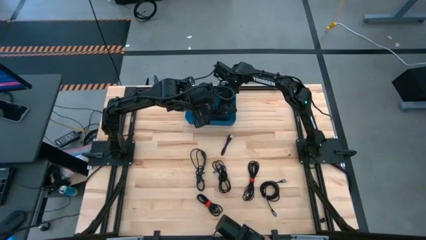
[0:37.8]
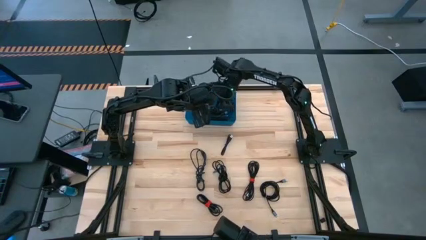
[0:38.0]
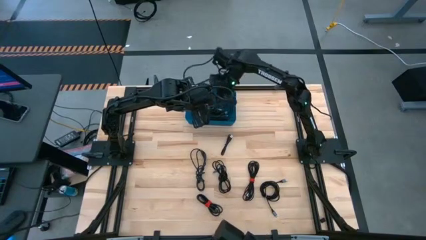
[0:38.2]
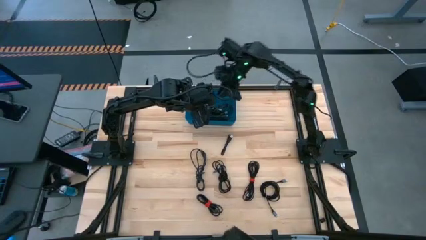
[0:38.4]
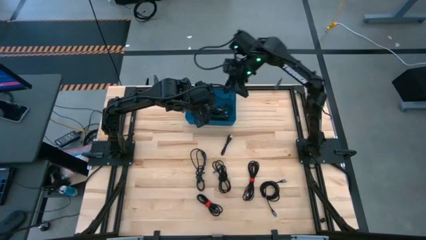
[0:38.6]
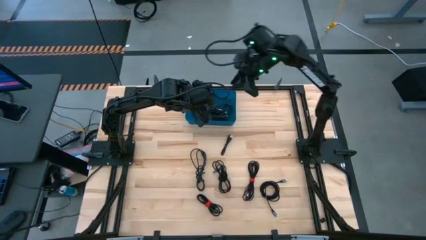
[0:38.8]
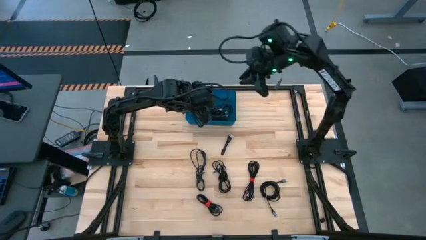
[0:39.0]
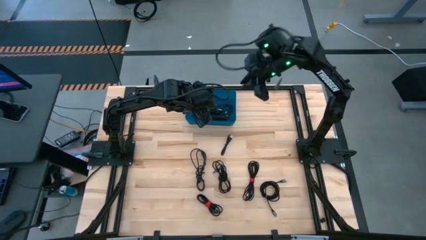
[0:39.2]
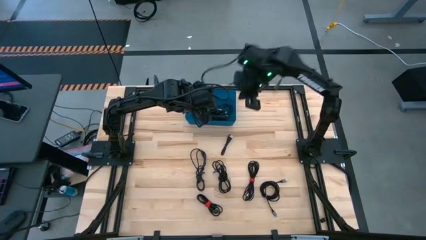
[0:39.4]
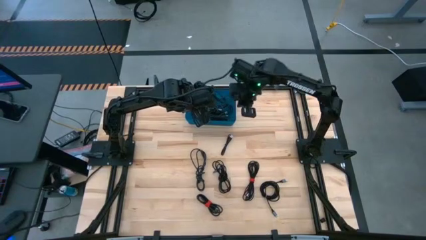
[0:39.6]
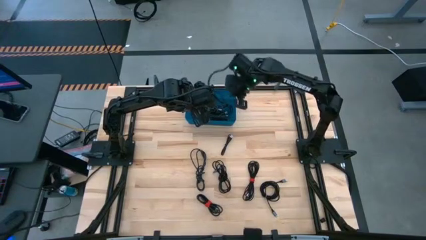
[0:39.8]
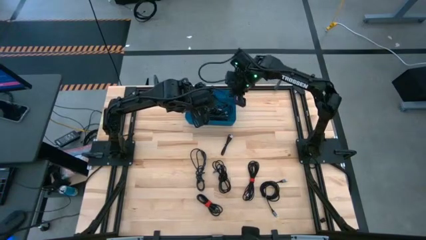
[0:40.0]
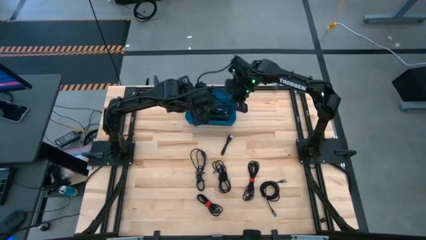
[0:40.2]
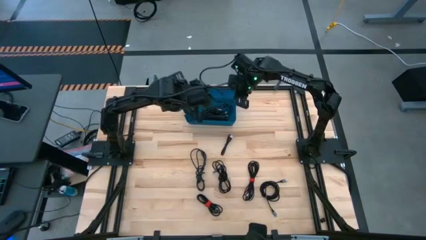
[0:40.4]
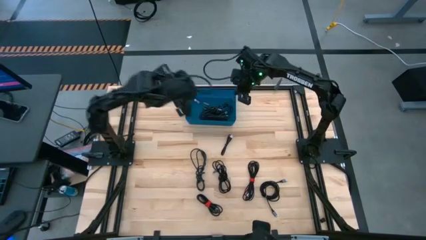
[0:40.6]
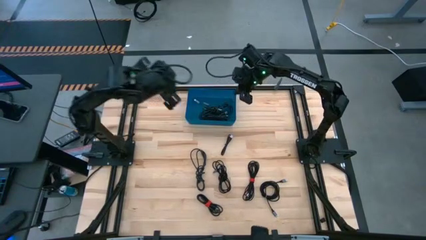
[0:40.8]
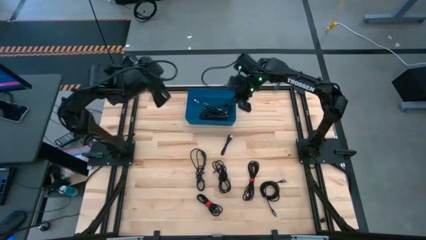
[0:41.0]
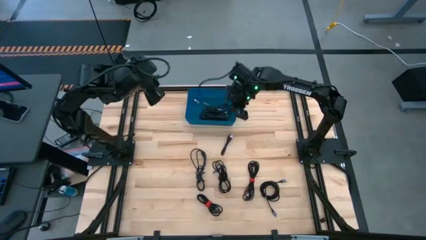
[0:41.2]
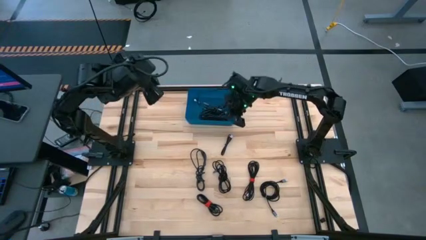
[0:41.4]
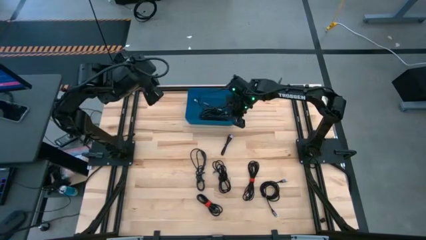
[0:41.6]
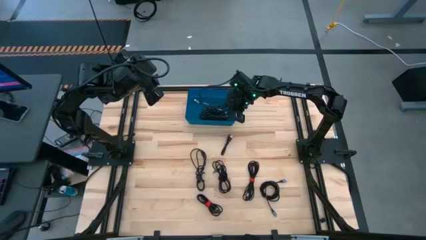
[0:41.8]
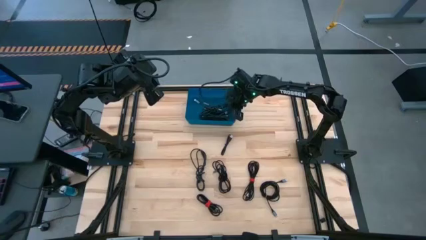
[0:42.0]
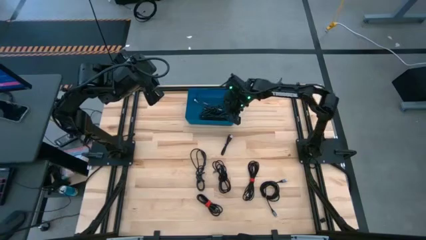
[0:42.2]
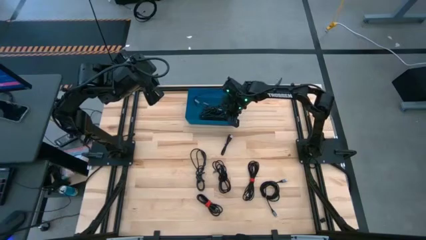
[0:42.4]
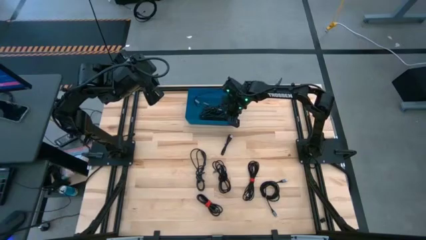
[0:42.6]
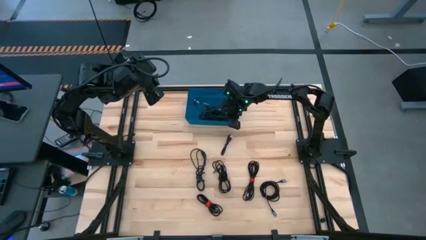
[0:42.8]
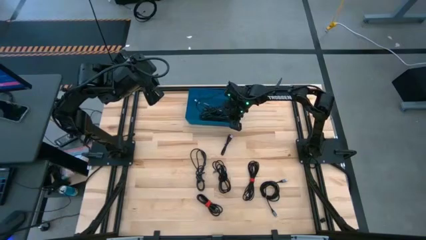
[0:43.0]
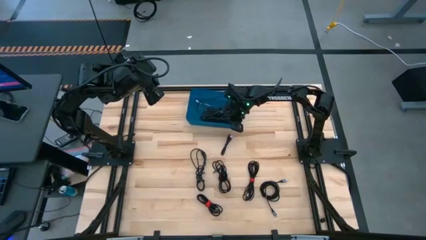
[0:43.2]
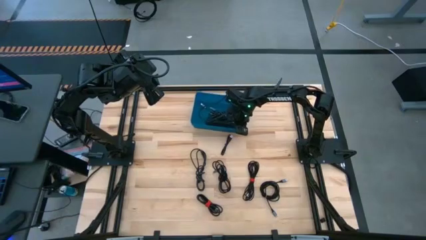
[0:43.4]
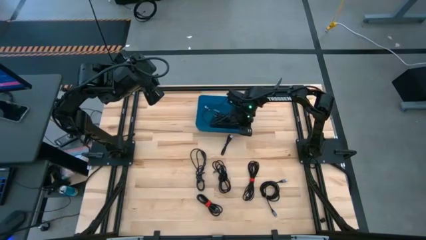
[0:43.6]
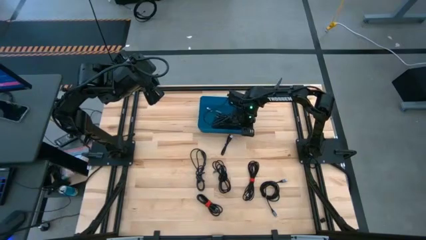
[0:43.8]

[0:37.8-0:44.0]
Task: Pick and place USB-C Cables
Adjust the blue bin

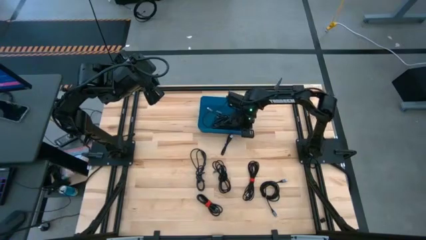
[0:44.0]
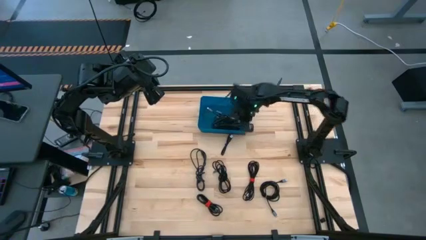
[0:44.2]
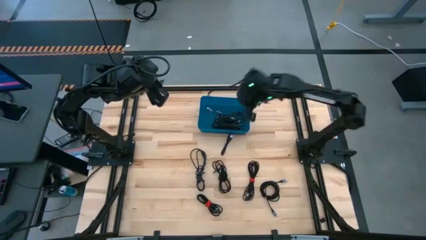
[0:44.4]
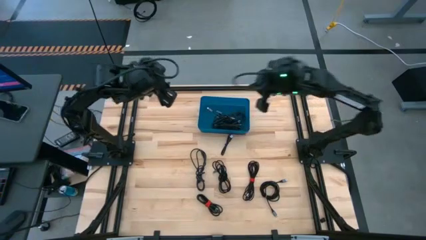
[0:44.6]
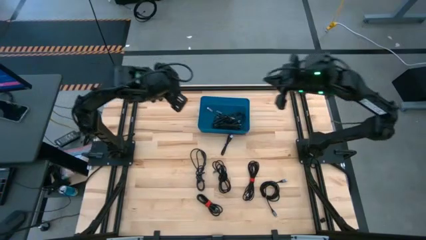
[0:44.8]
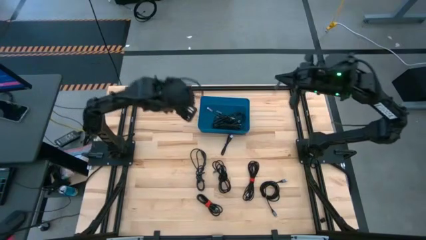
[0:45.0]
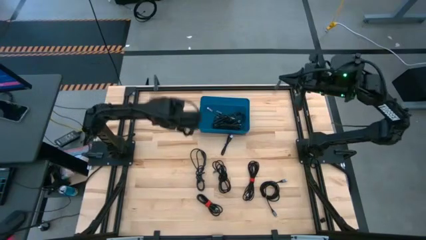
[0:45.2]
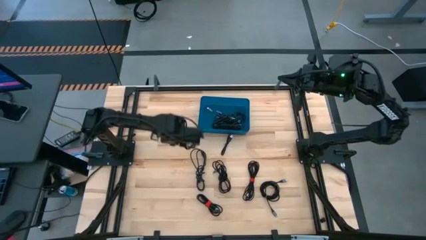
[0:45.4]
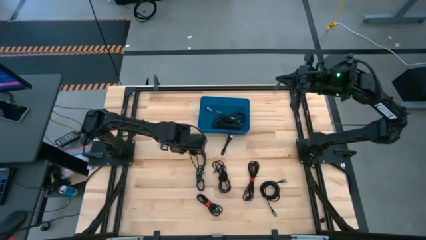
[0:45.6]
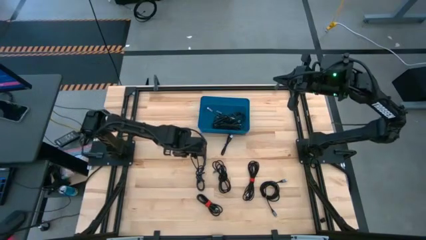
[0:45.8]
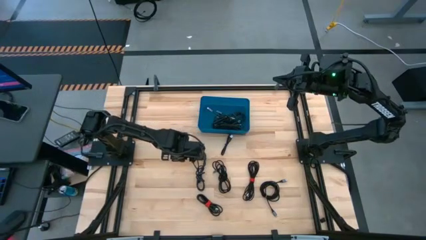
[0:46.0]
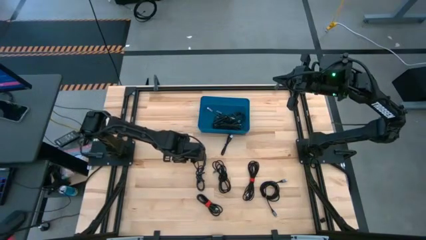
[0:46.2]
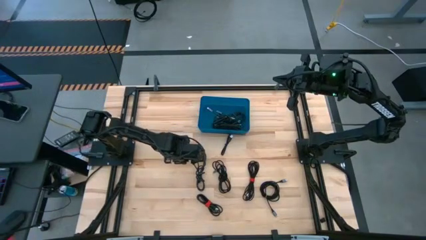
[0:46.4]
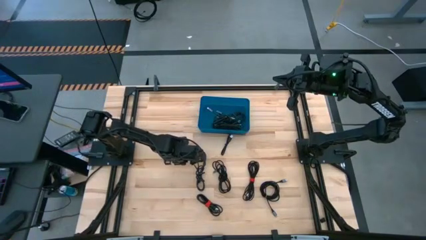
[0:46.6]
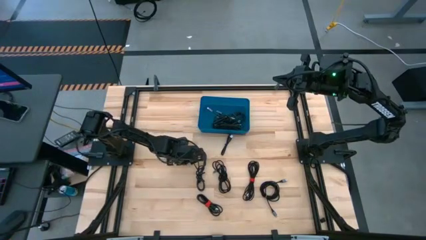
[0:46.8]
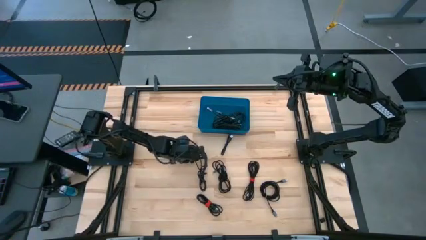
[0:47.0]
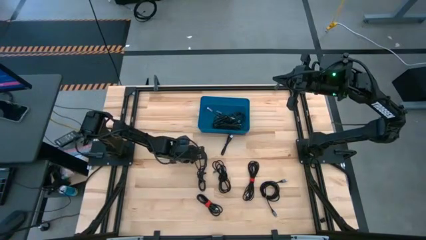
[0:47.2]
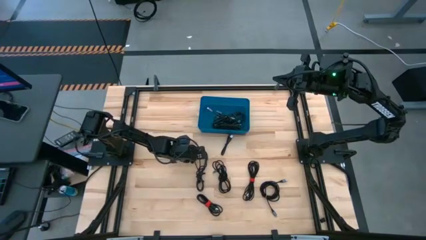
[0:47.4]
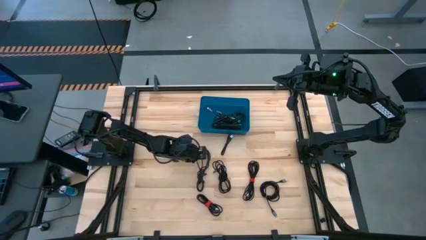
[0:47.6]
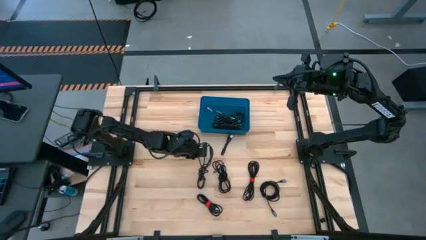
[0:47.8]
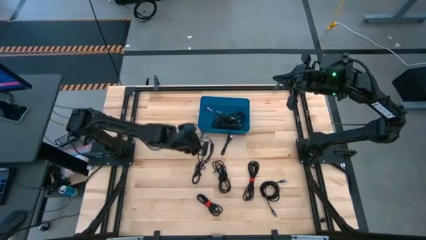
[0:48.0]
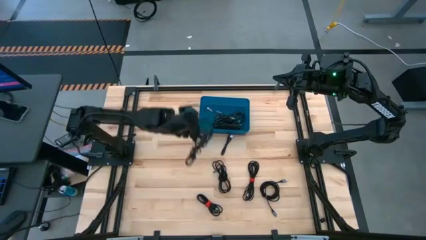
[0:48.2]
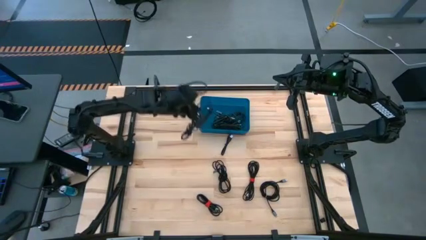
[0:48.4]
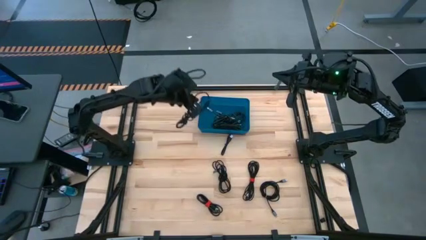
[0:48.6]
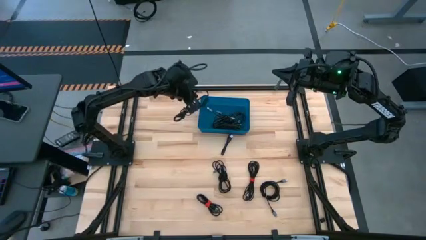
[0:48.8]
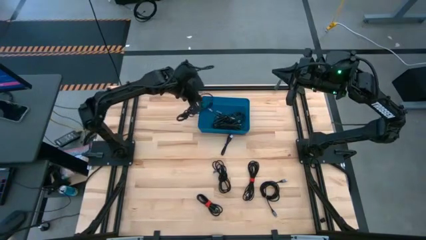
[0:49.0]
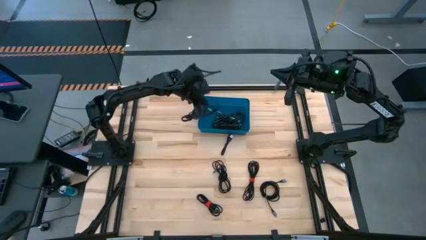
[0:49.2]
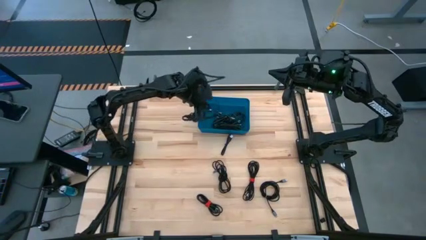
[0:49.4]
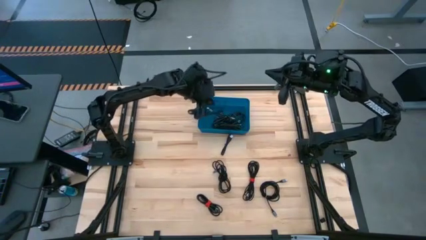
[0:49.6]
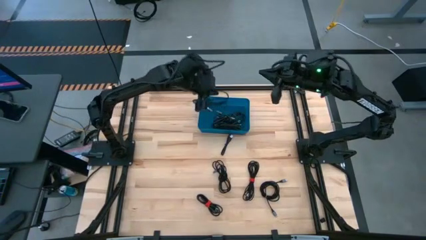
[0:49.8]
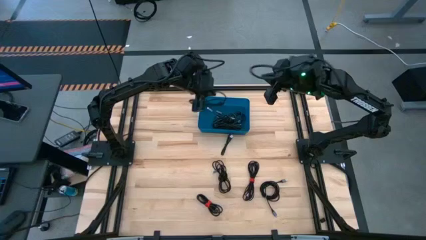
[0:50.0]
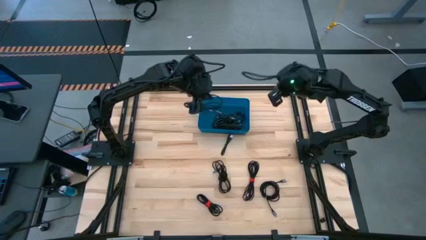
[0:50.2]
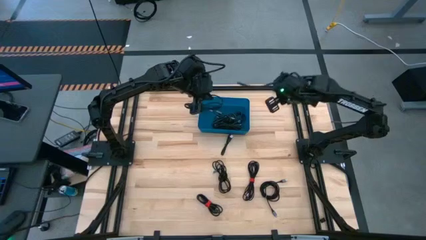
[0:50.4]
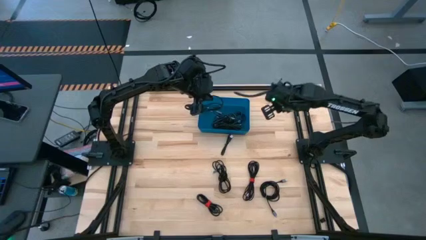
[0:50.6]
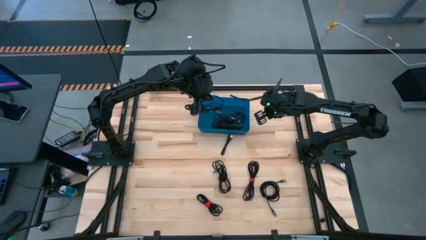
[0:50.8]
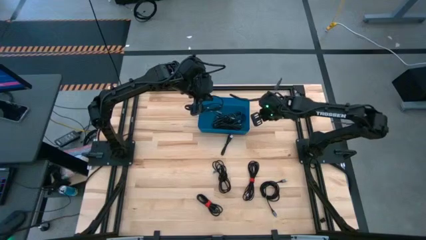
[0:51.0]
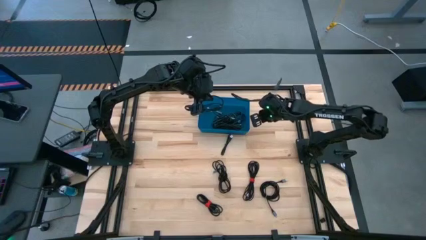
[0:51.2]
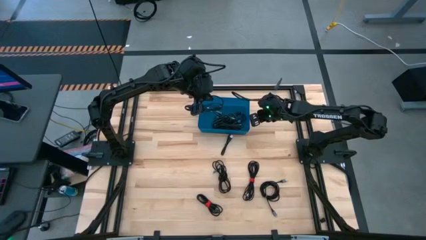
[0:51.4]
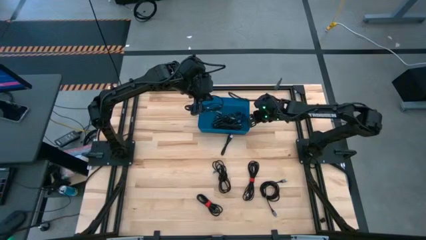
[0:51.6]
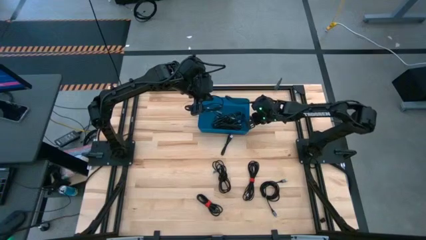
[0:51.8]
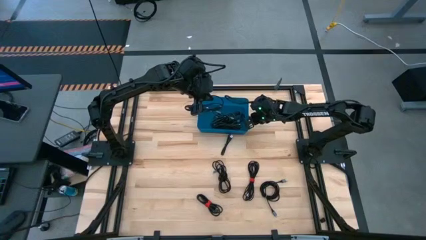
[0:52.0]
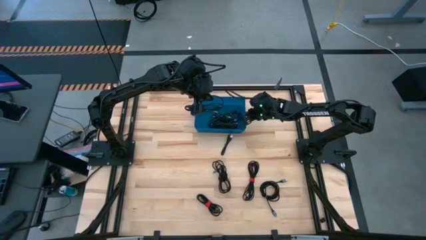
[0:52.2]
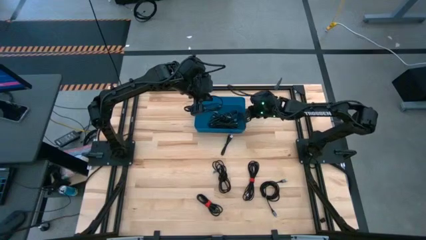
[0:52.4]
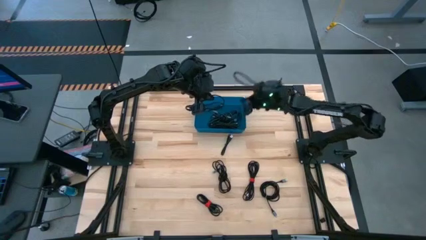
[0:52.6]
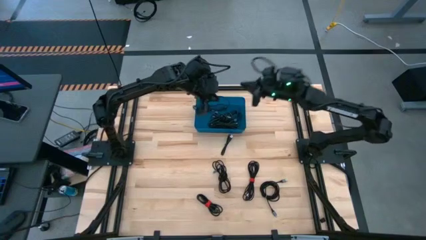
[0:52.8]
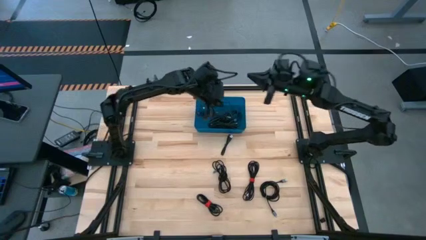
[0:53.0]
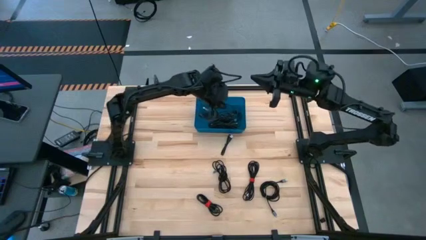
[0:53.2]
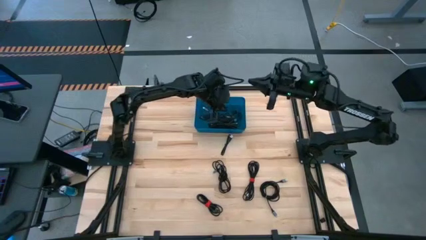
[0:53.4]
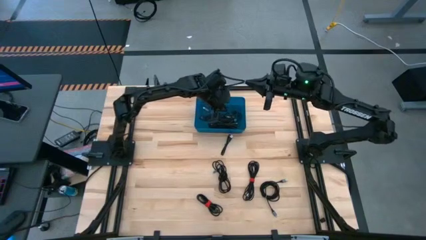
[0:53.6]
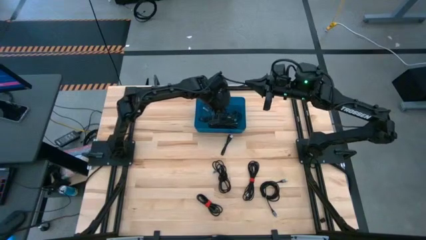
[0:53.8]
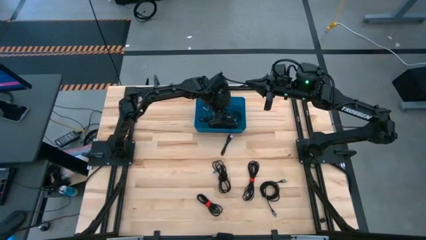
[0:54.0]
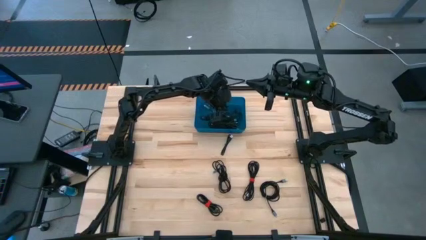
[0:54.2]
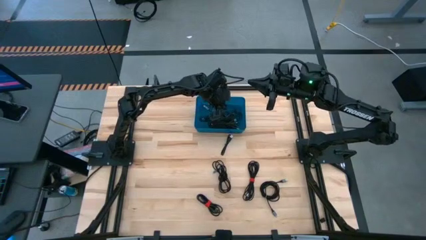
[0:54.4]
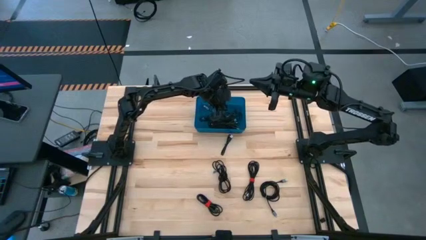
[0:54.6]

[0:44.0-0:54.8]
Put the black charger cable into the blue bin
